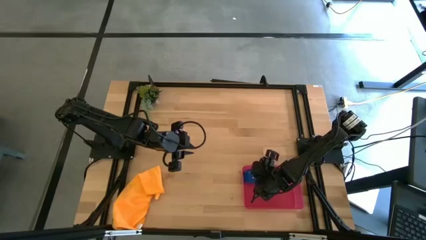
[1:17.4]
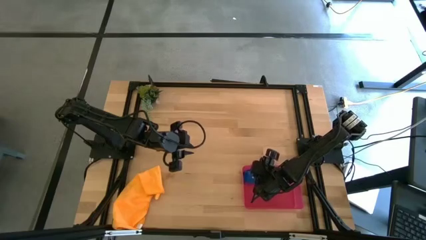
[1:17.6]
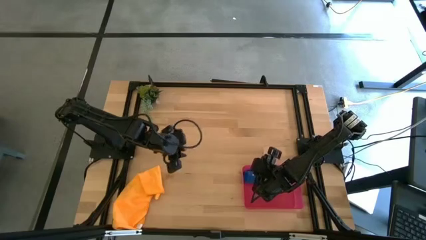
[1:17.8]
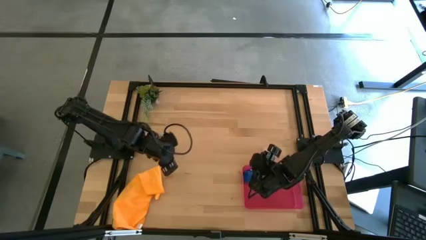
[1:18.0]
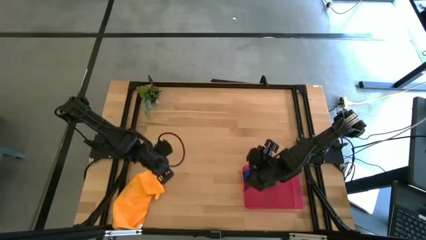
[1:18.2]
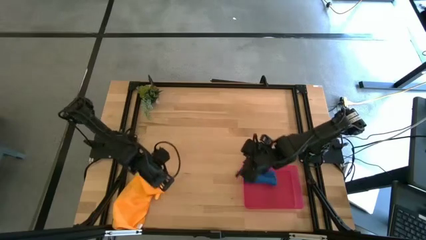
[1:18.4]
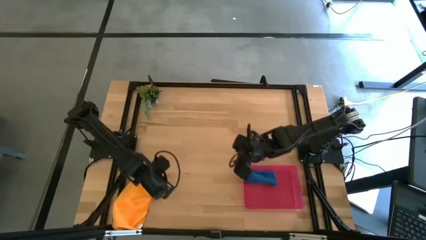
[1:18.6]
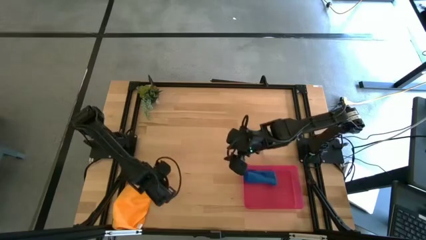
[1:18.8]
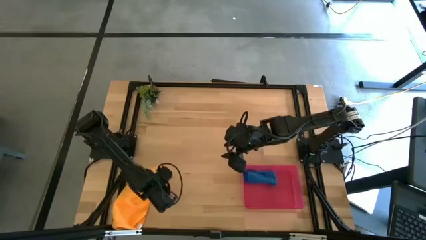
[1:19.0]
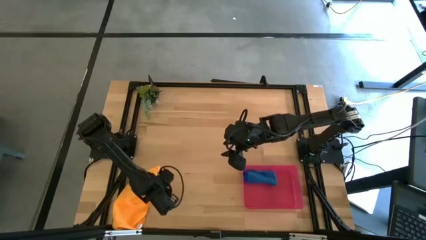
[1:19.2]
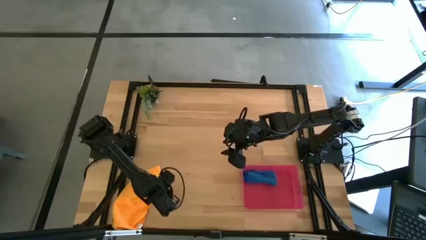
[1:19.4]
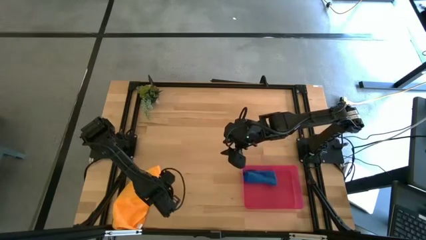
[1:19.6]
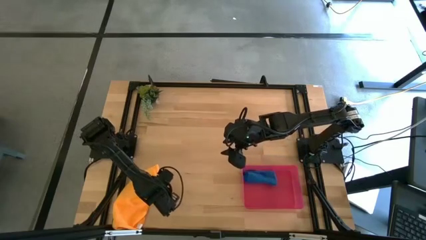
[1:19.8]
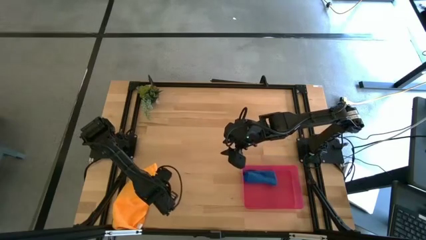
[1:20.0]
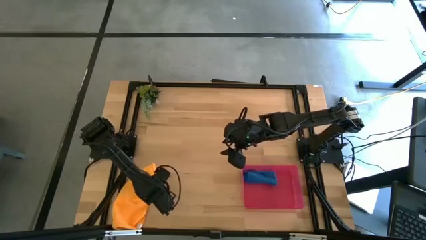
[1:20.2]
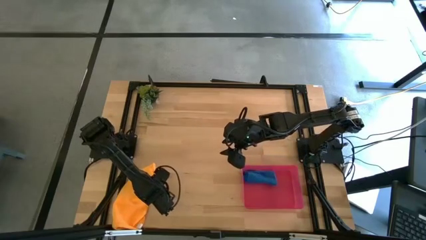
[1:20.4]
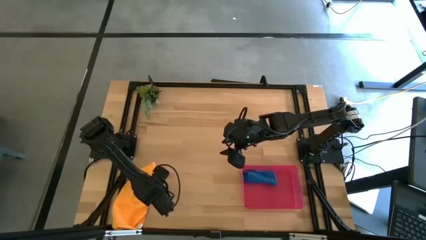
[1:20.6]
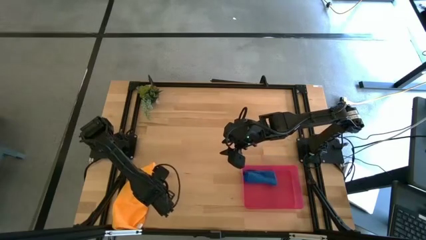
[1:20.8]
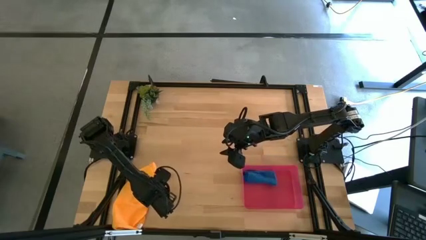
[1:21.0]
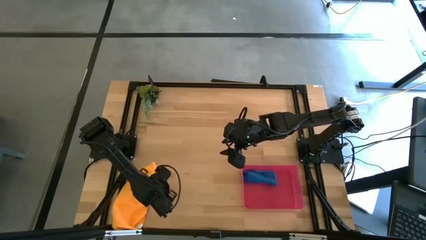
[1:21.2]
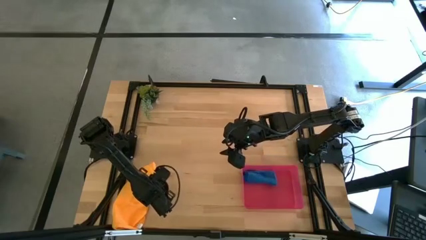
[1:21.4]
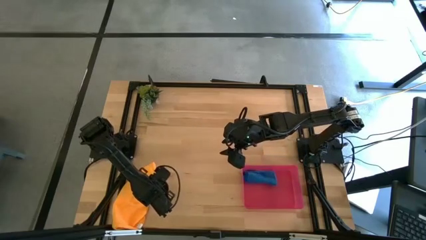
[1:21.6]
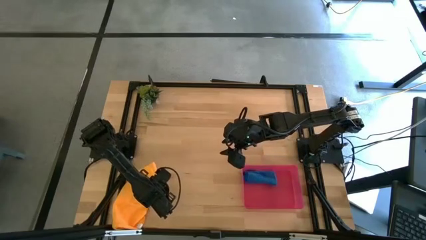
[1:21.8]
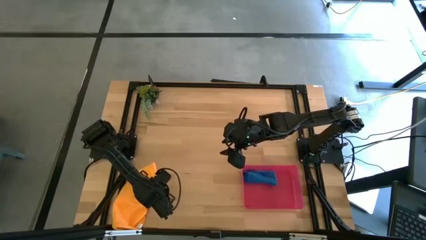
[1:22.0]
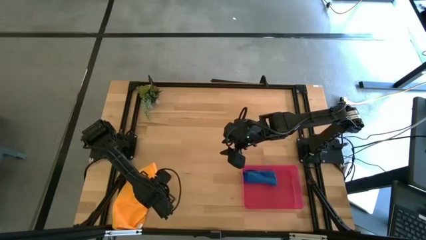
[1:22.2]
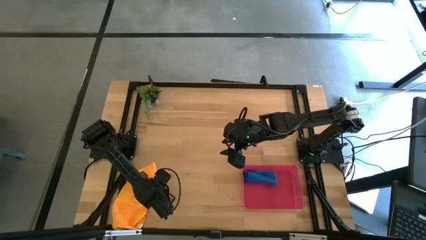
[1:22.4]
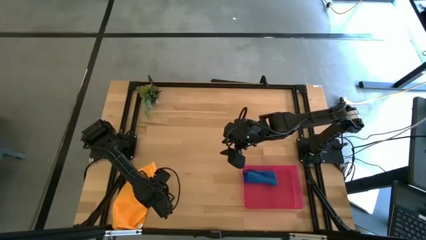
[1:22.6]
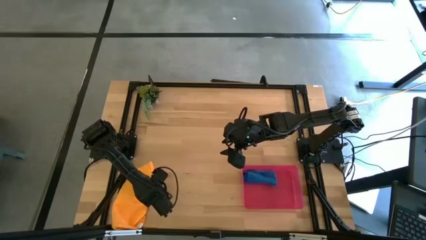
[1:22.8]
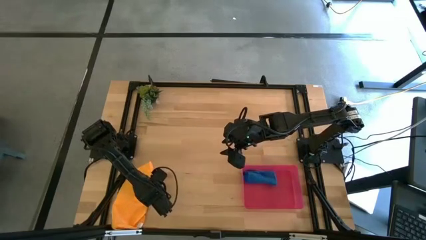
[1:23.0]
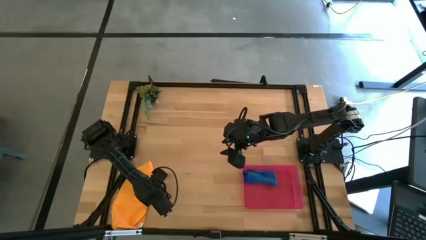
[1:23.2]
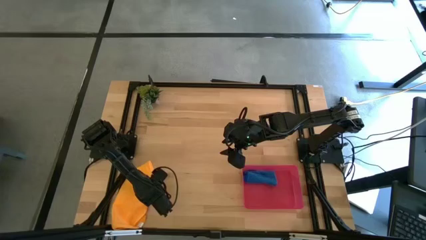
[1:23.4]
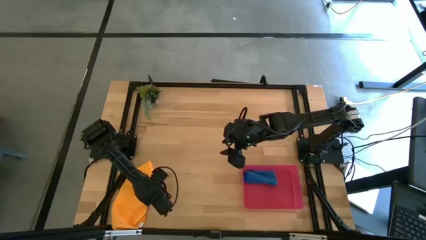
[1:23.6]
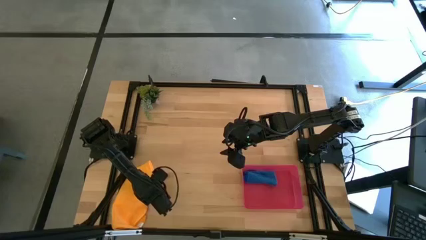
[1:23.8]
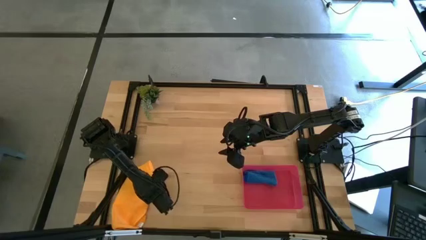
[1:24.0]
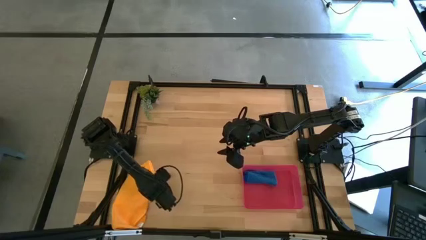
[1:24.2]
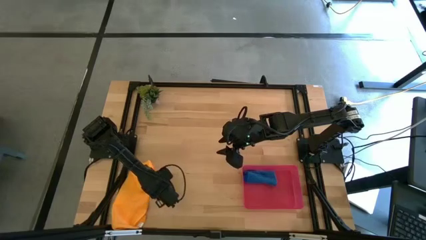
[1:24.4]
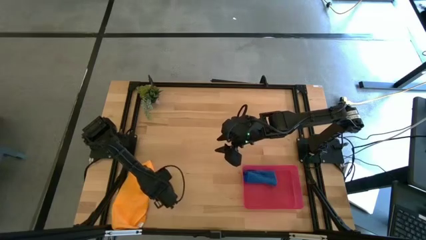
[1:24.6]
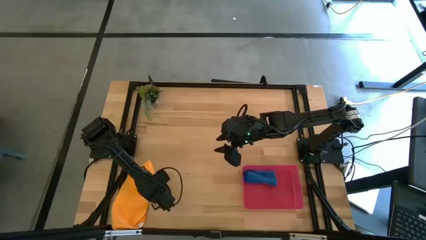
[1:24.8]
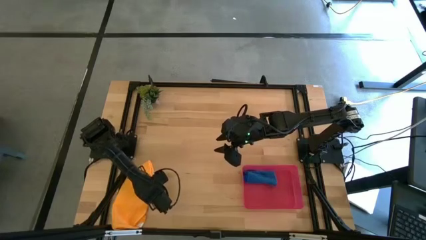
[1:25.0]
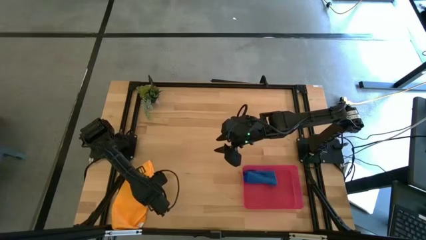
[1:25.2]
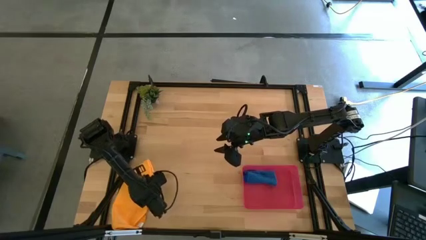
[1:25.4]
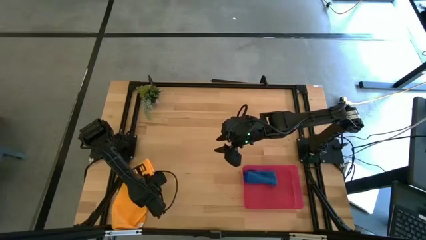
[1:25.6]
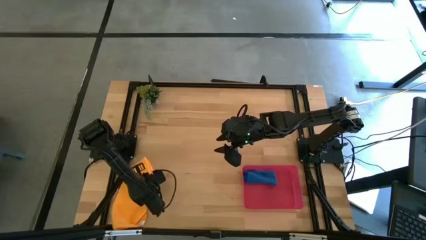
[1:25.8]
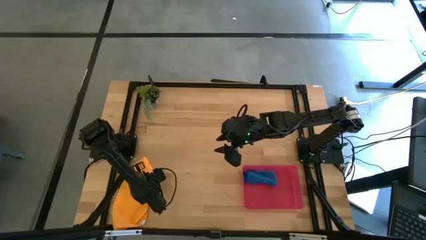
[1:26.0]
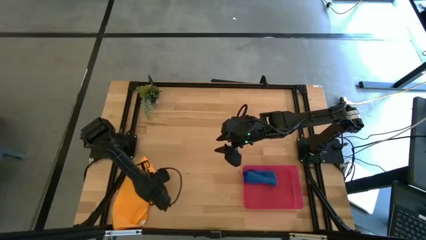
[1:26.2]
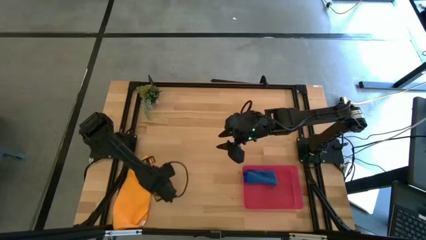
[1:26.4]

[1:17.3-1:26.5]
Task: Roll microfiber towels into tight, uniform cylinder then place into a basket
Move the orange microfiber towel to the center of the table

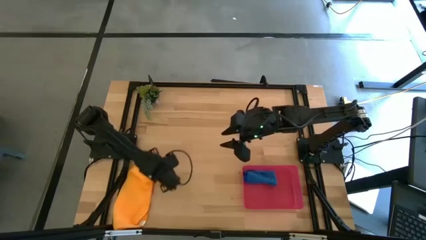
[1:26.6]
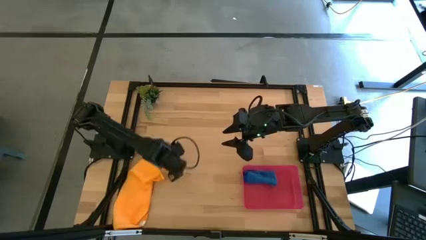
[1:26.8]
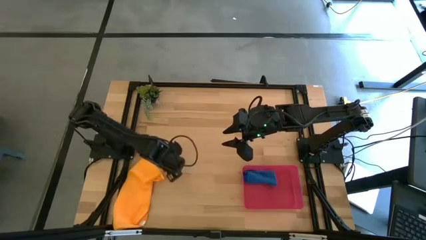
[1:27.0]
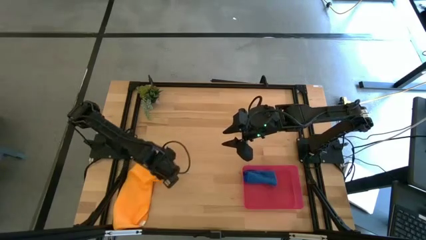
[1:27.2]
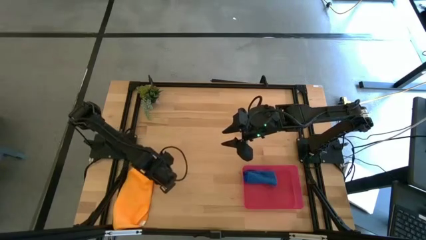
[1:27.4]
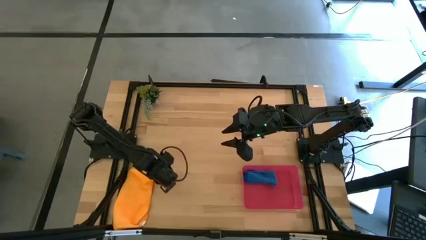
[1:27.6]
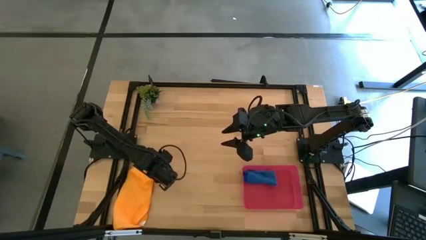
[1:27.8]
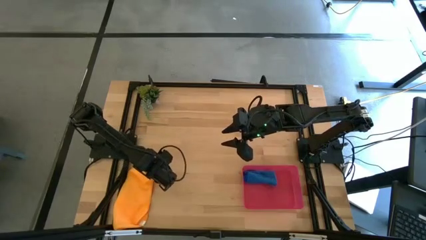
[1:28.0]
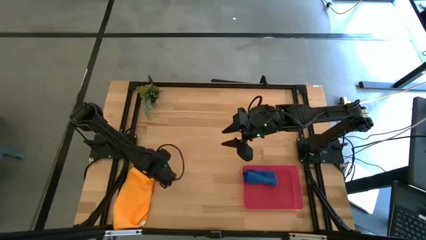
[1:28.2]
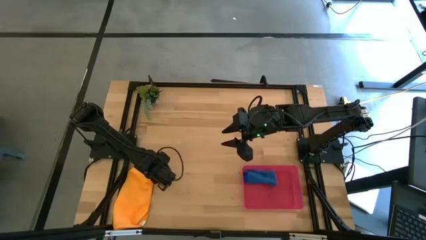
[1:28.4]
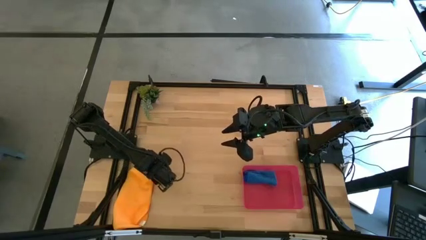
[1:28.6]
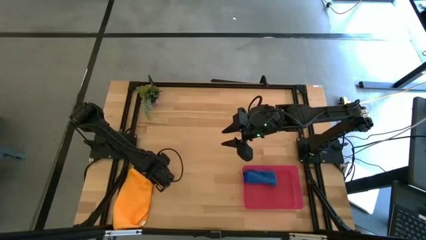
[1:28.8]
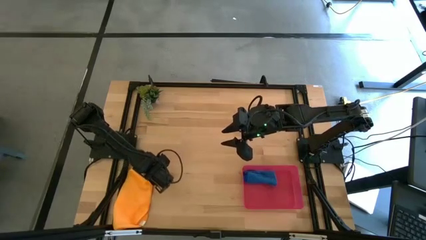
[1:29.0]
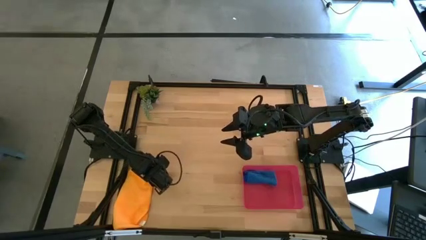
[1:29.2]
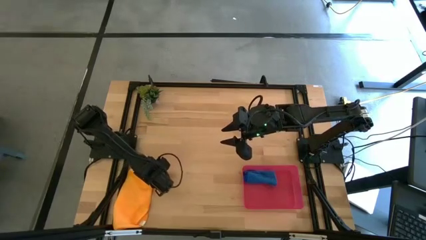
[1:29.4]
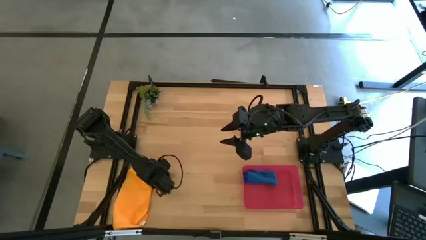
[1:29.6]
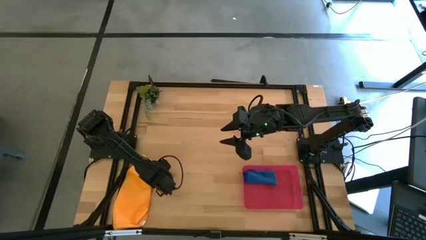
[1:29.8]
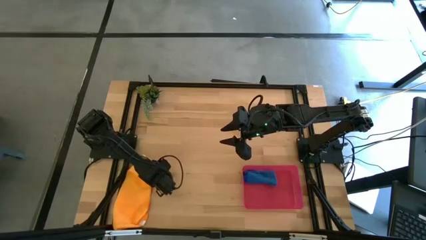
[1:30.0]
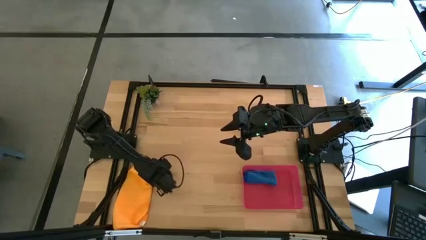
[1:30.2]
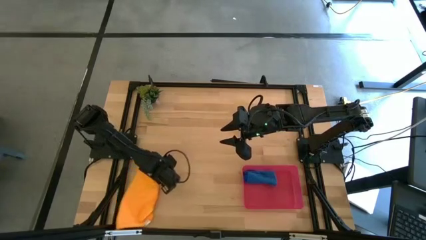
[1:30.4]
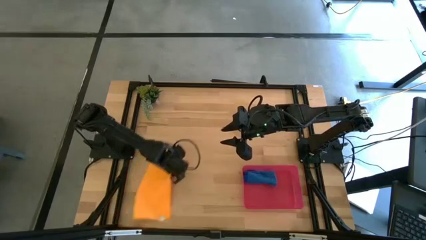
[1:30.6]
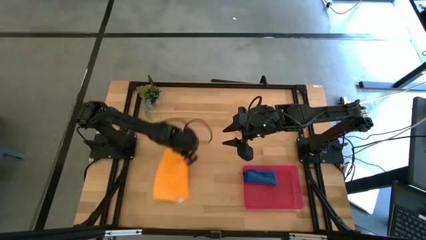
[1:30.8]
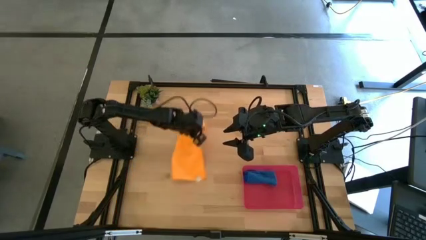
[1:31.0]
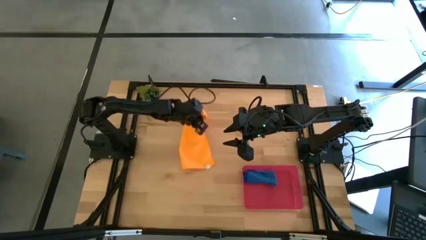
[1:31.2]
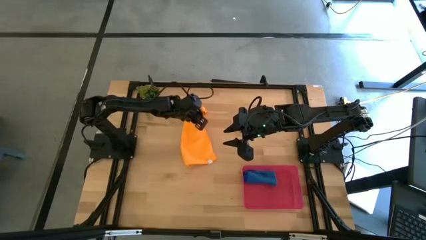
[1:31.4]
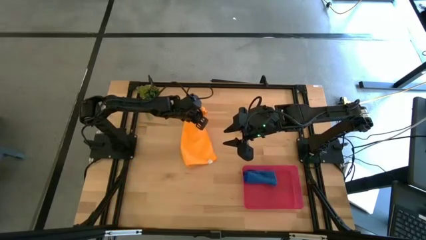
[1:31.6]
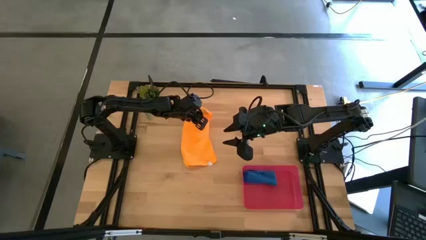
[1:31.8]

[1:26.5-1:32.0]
Move the orange microfiber towel to the center of the table

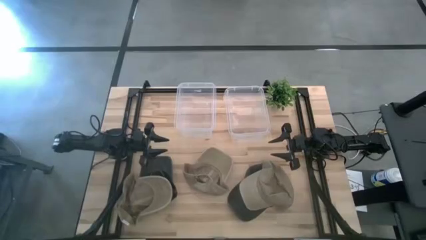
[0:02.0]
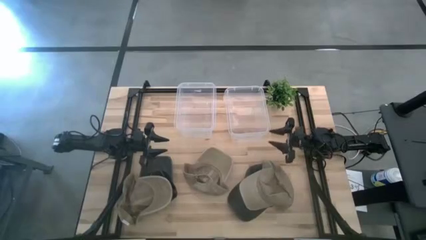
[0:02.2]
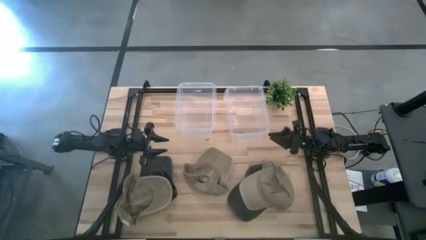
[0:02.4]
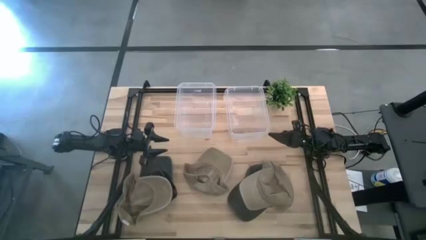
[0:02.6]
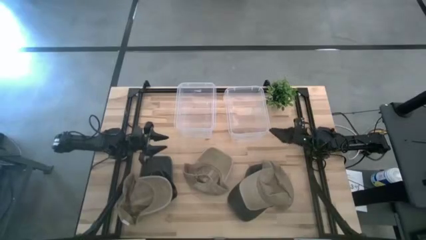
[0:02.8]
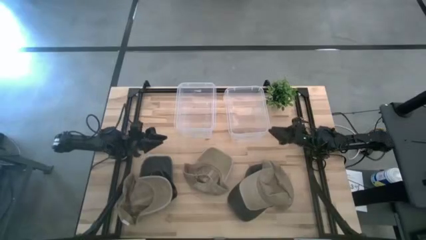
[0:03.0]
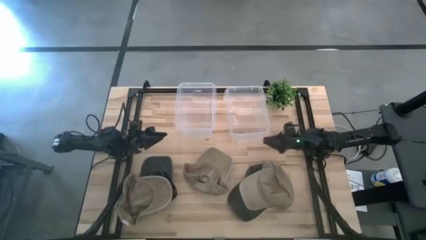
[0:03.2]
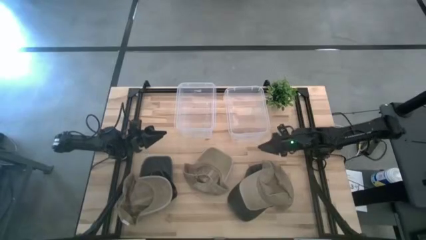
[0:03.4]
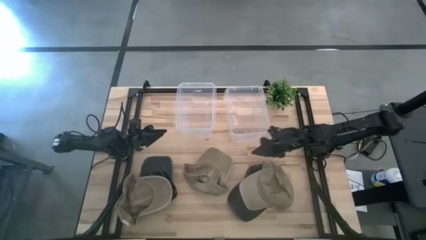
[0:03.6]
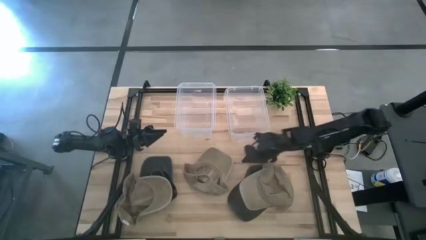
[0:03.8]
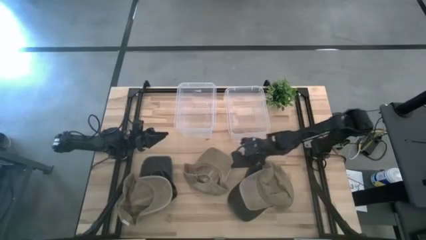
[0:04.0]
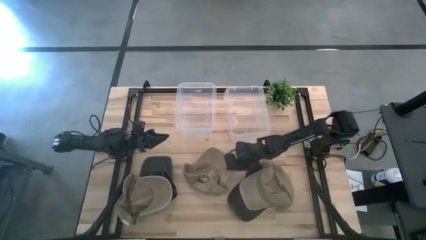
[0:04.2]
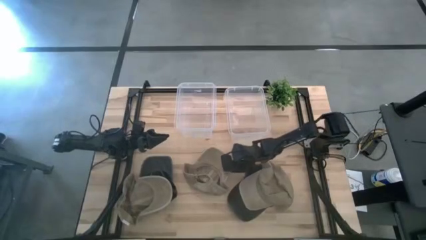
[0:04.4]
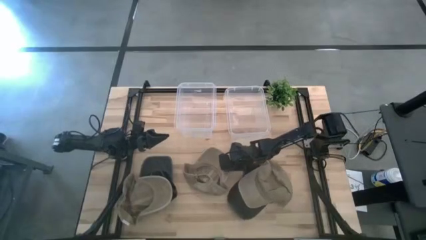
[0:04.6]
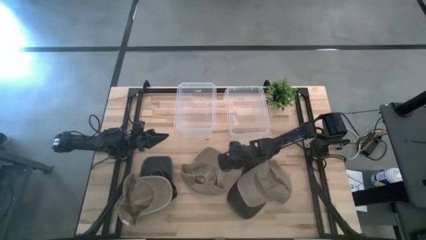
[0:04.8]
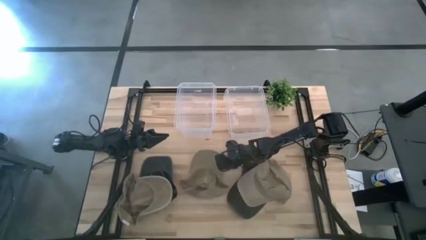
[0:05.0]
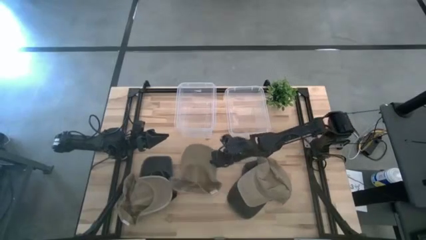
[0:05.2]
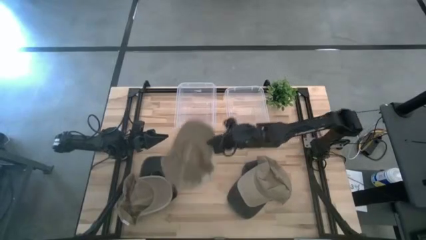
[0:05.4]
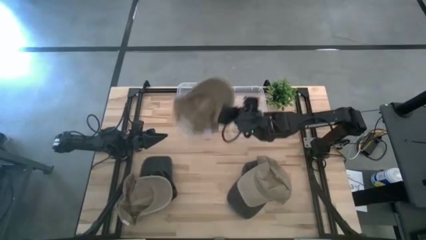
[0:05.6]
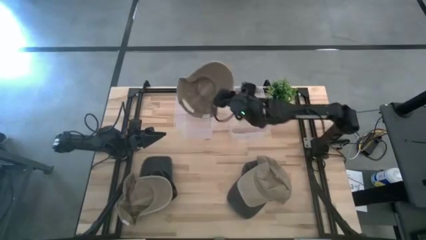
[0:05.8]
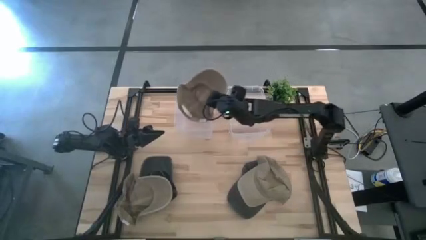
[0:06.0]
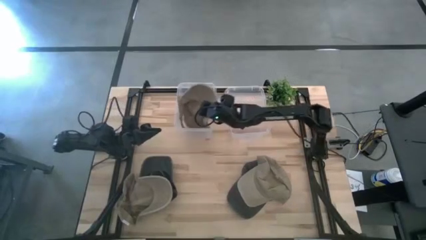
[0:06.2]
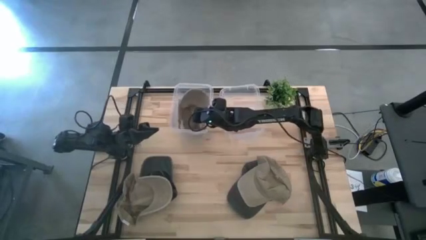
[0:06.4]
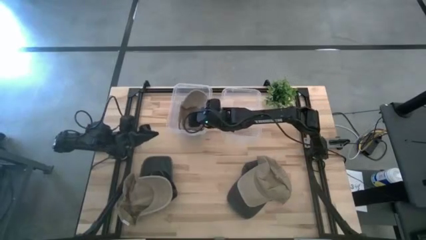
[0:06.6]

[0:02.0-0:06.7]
Task: Pick & Place hat
Put the middle brown cap into the left transparent bin
